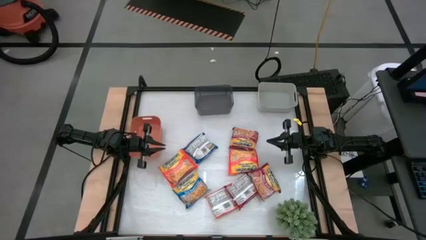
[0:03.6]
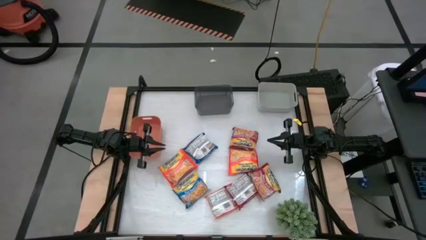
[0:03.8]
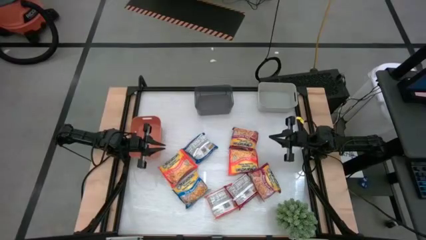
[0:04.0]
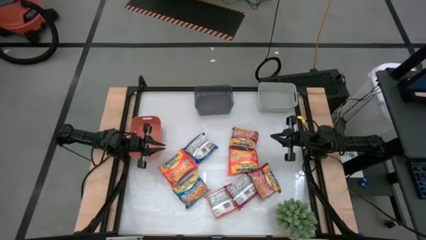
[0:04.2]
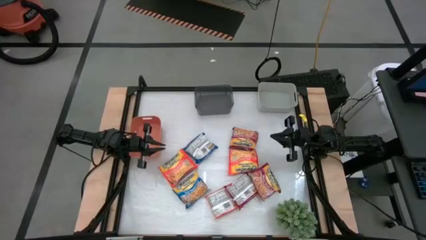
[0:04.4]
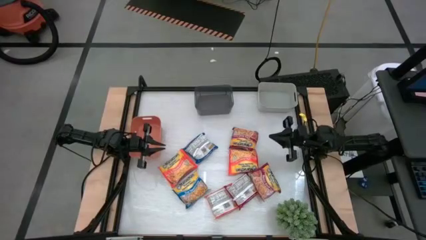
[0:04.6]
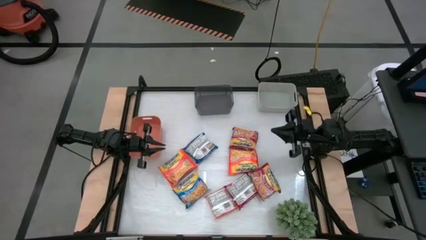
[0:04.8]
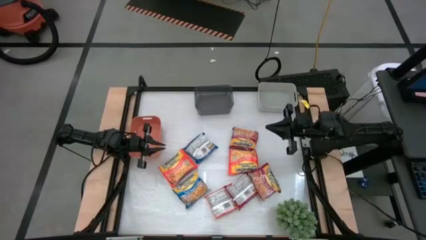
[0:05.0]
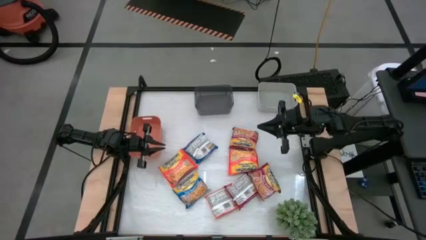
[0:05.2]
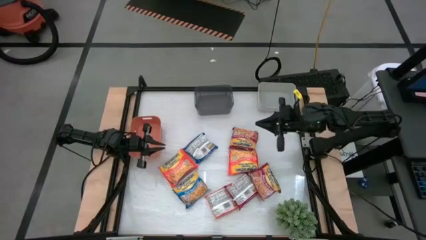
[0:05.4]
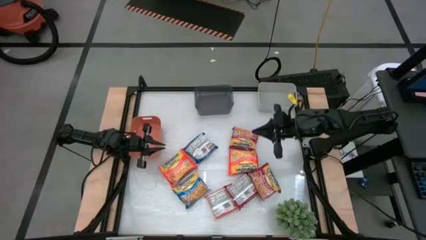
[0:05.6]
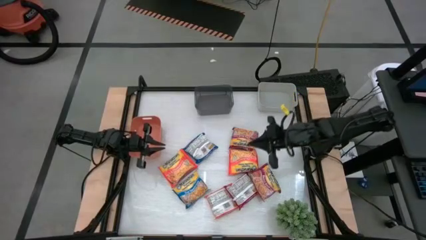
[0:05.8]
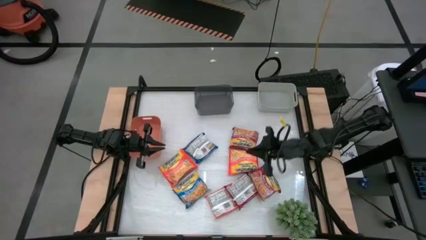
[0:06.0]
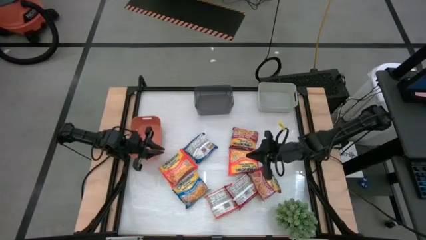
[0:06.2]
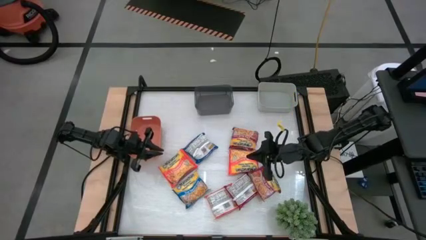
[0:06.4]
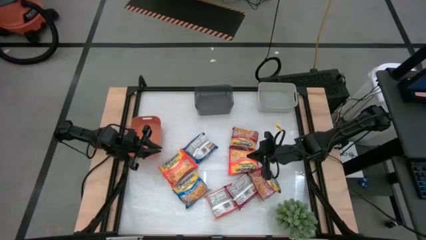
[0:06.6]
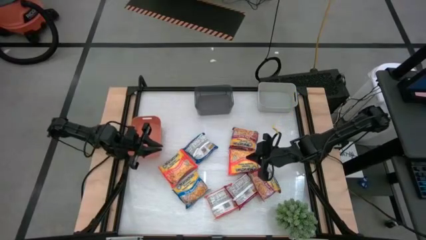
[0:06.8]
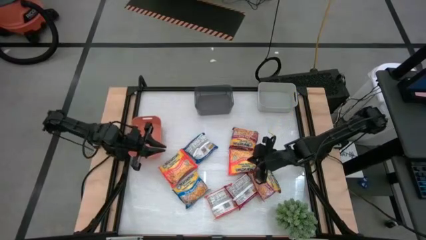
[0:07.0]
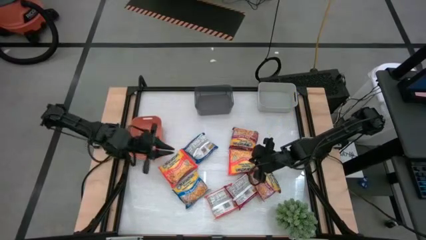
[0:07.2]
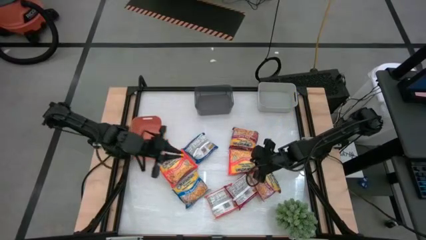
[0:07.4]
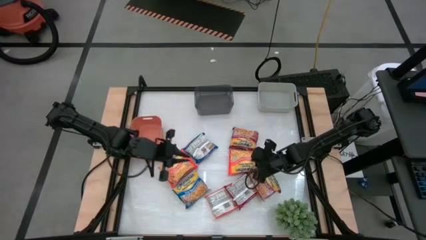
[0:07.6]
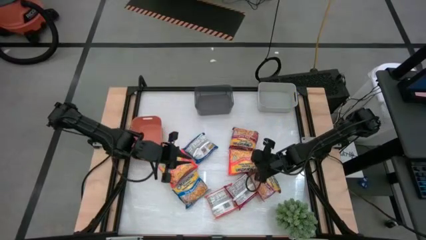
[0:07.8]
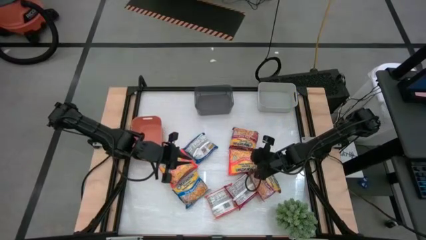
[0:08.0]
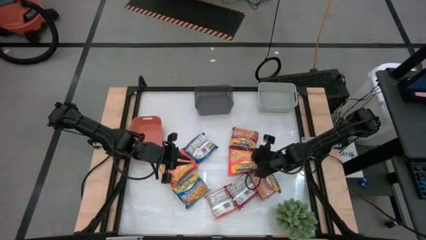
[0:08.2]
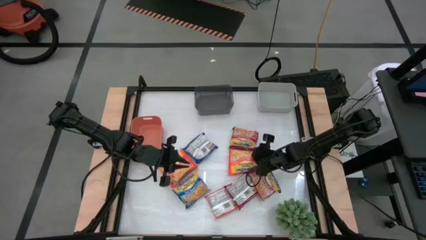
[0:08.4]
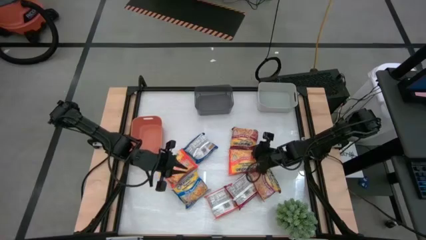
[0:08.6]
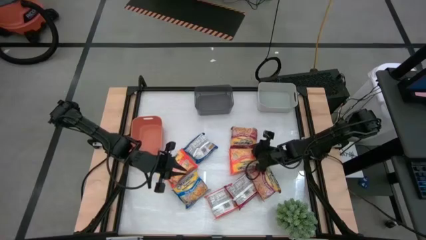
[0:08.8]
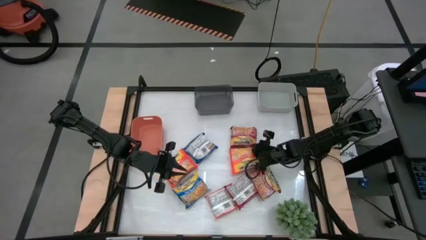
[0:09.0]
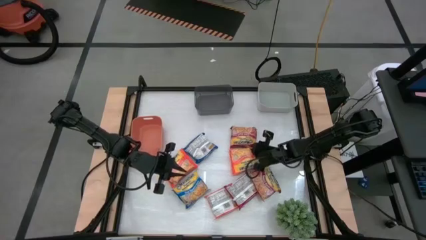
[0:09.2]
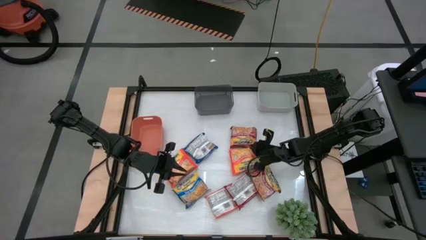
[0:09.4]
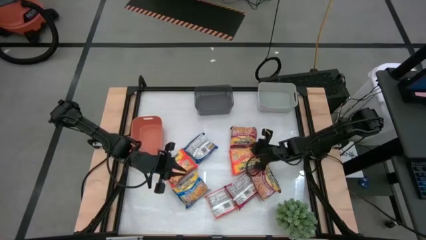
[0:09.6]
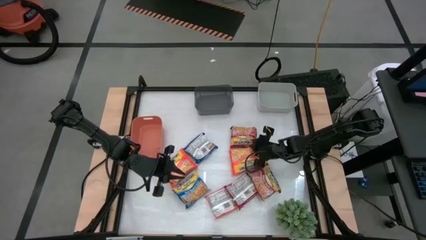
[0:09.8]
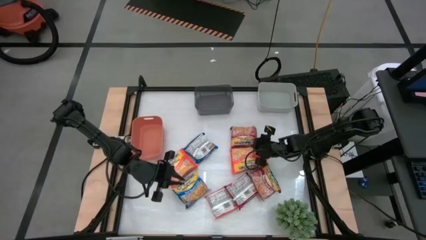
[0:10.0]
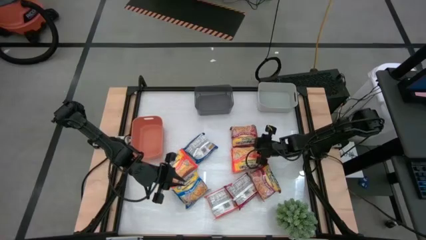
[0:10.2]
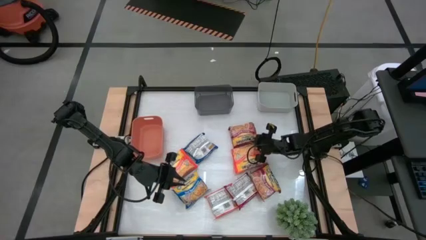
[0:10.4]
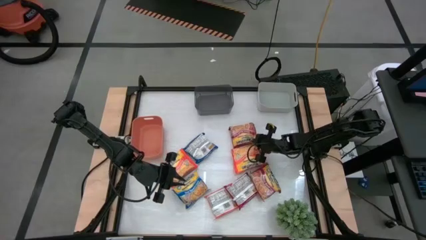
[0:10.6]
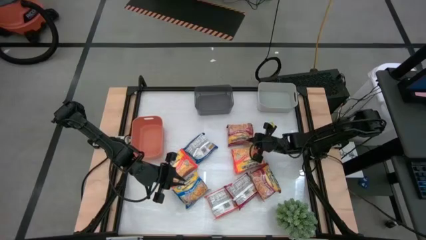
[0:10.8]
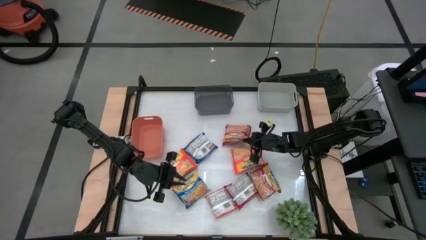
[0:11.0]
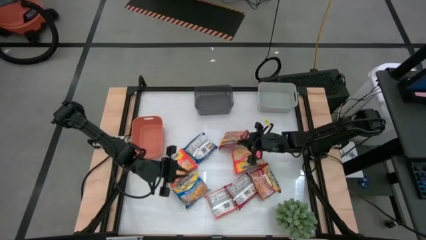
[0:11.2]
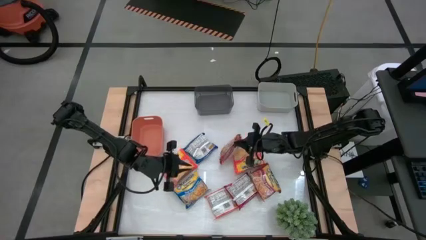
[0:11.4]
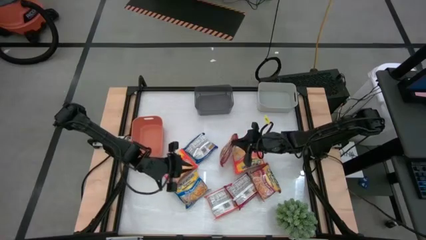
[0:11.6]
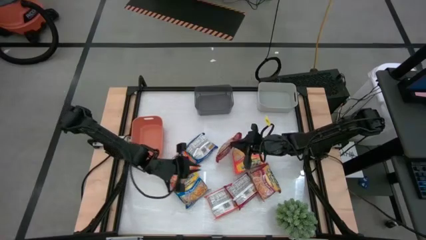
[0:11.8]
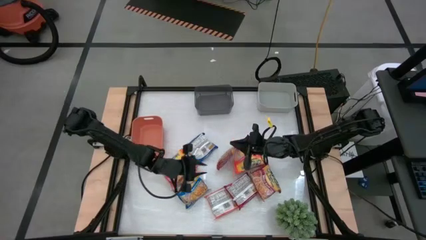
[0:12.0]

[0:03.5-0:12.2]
Task: Sort Maruchan noodles
Put the top red noodle pack into the orange bin

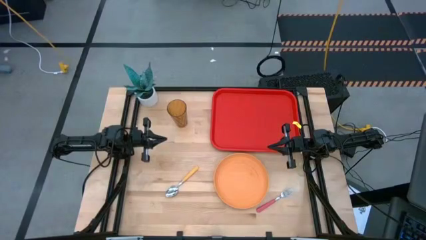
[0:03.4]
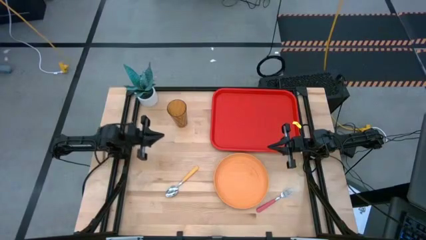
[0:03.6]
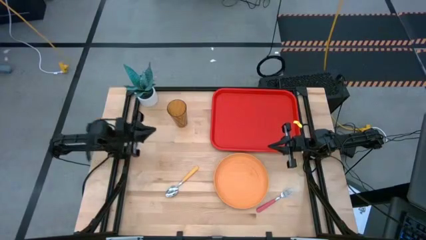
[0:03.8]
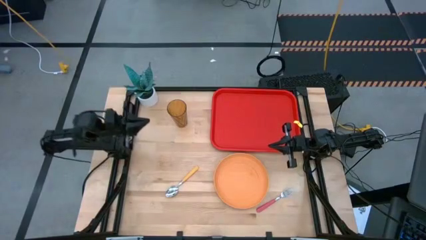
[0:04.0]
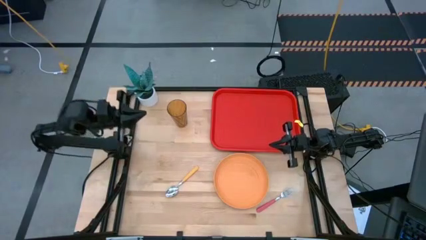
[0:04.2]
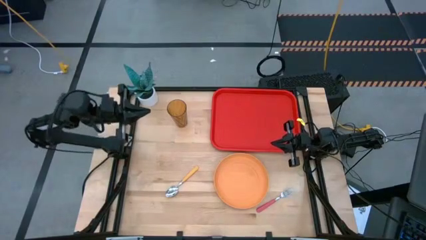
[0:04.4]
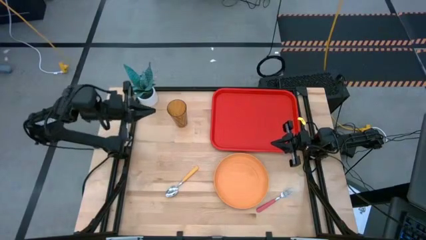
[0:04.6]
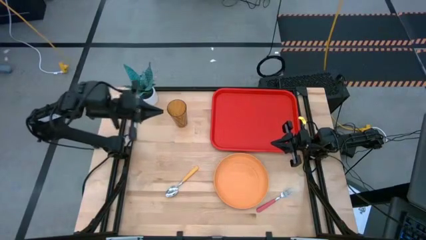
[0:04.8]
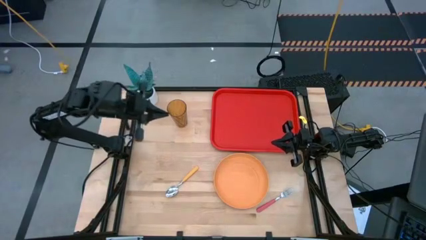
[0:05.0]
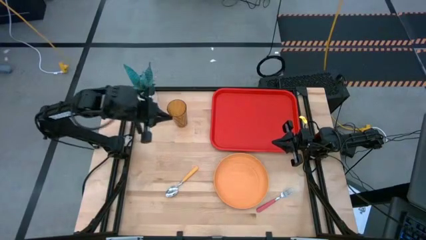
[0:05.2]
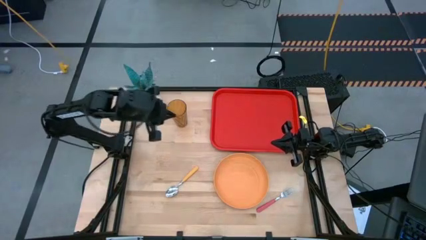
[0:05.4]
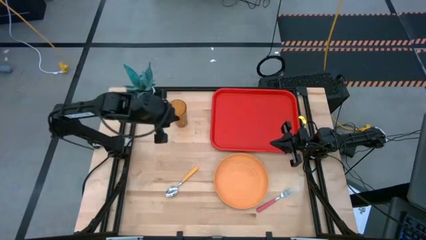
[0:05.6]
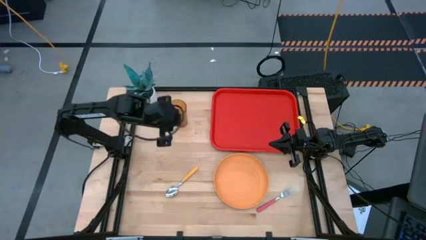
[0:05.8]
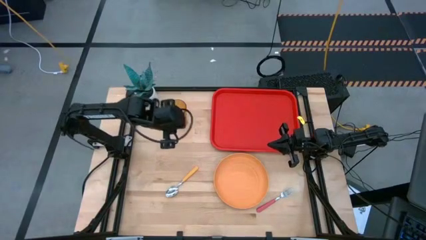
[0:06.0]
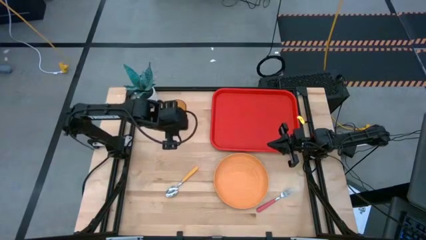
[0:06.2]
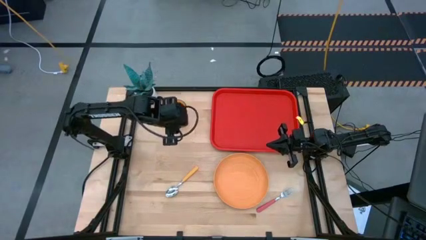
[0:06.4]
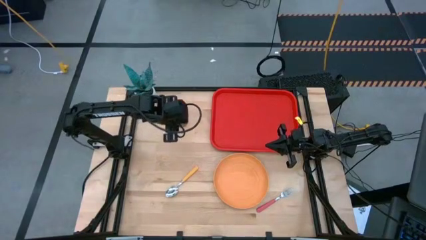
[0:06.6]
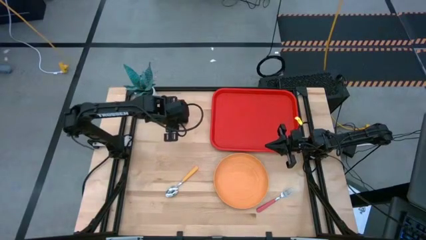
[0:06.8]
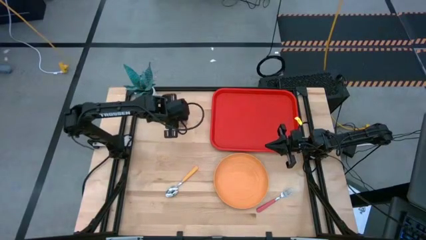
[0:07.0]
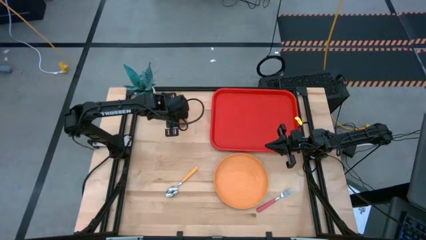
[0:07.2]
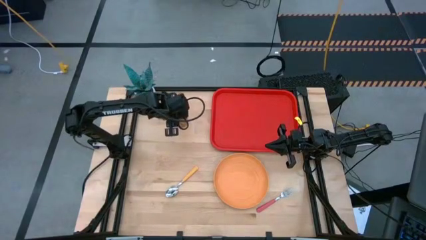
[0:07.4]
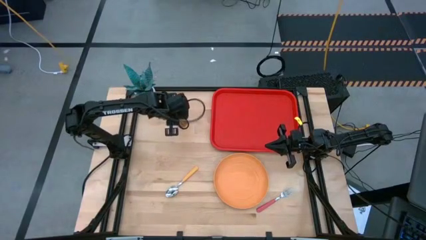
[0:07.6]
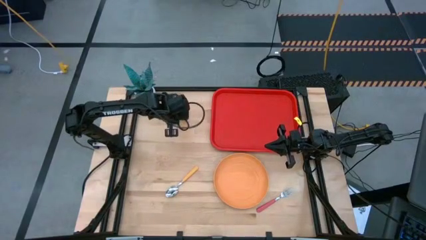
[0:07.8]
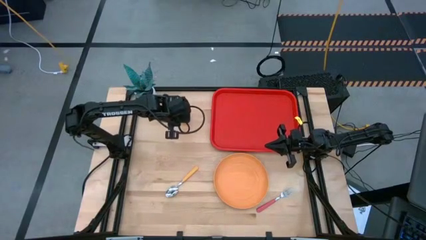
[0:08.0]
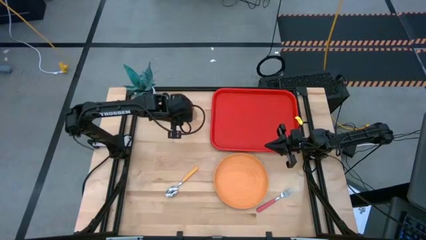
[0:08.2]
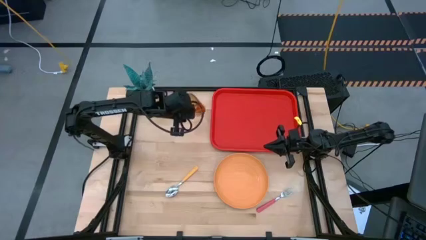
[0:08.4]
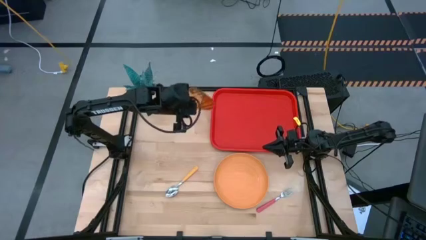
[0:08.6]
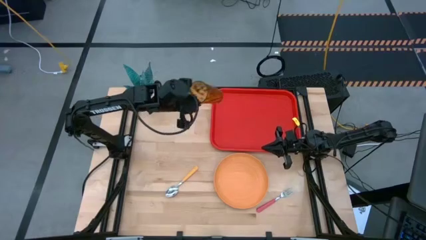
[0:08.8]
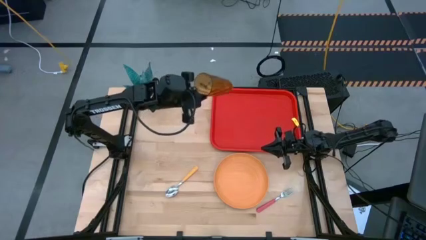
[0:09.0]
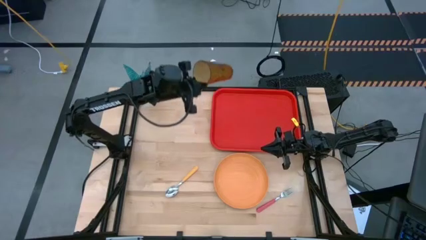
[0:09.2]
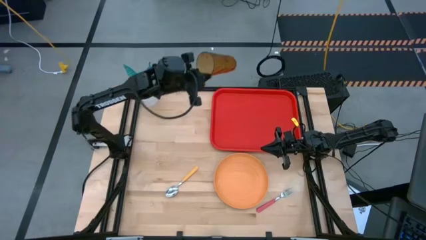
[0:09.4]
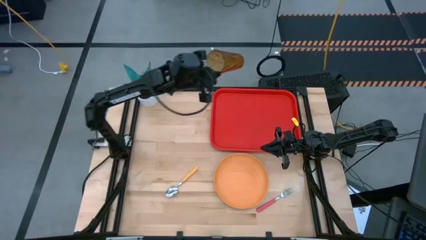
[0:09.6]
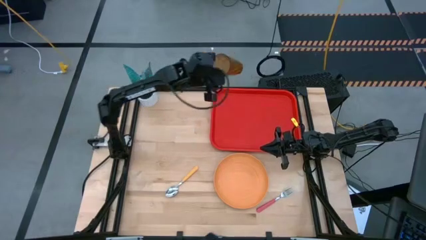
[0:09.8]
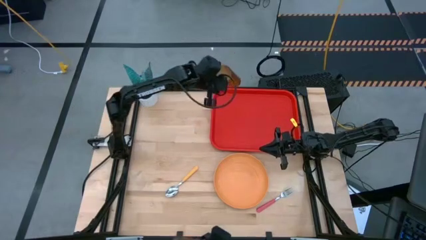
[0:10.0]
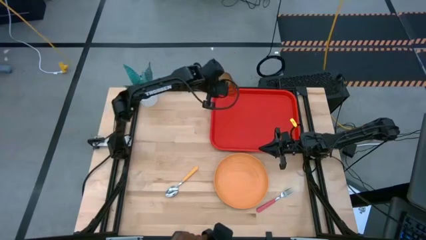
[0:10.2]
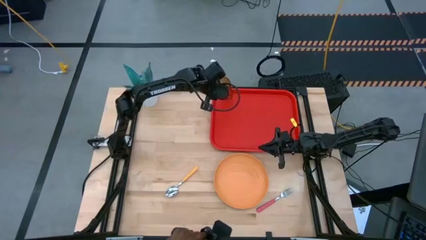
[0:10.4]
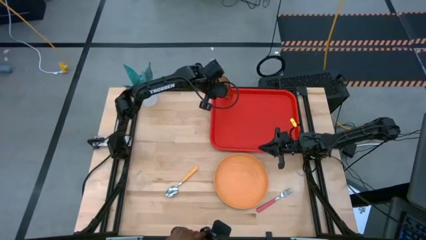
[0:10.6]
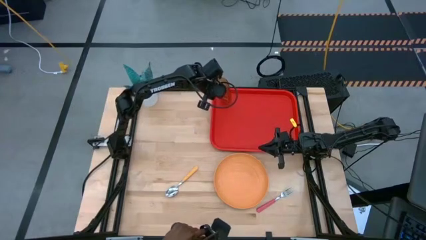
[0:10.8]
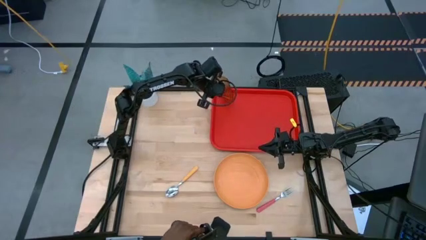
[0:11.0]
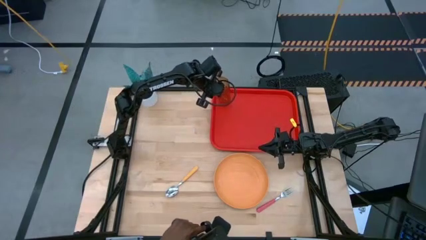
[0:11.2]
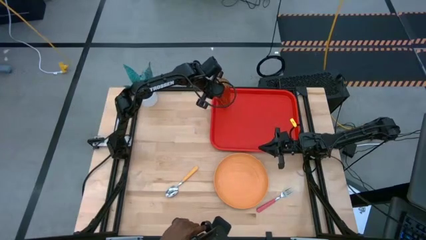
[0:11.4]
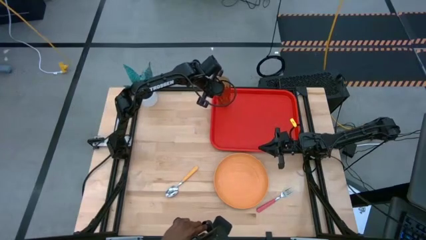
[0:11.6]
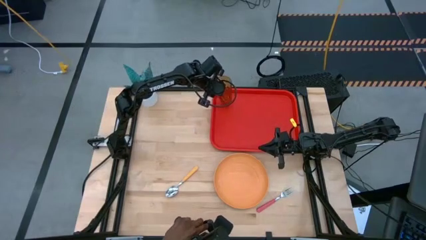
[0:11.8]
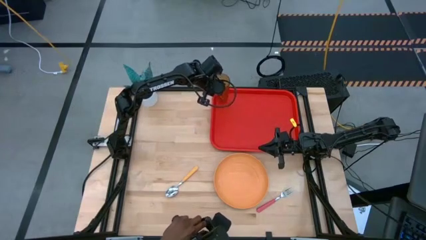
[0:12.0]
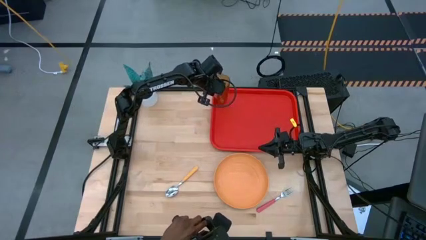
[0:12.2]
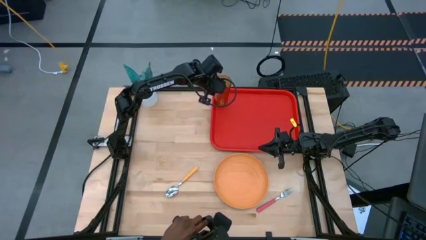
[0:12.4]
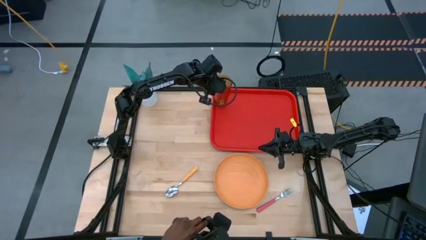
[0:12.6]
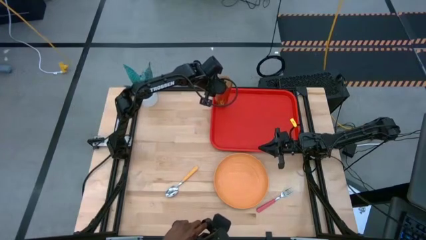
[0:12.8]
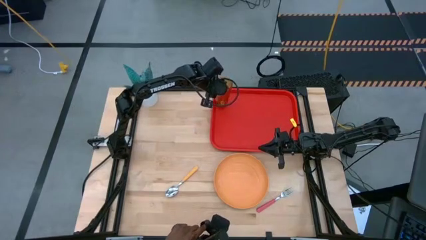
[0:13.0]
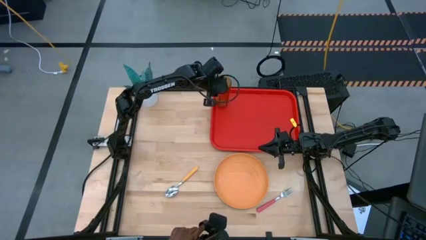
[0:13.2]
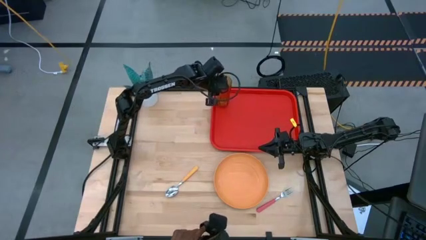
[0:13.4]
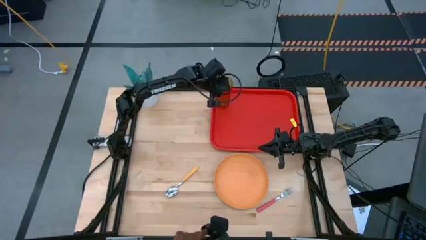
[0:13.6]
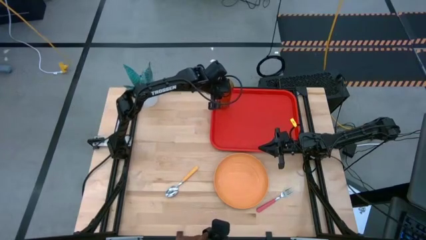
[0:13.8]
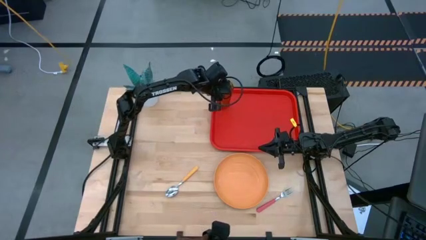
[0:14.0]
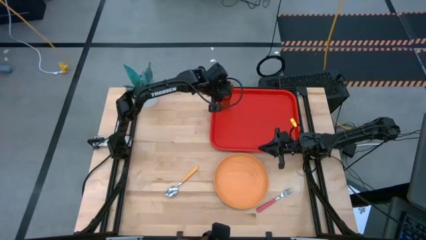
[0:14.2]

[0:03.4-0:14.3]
Task: Pick and place plate/cup/fork/spoon on tray
Put the orange cup on the top left of the red serving tray
